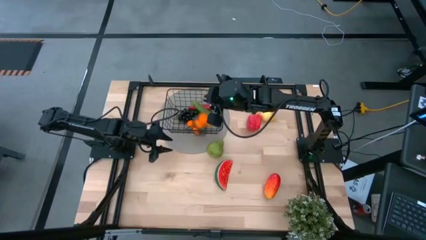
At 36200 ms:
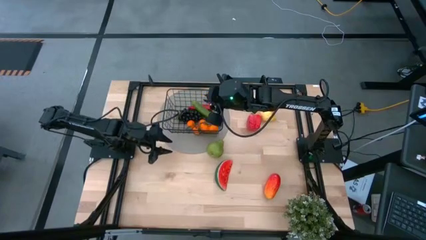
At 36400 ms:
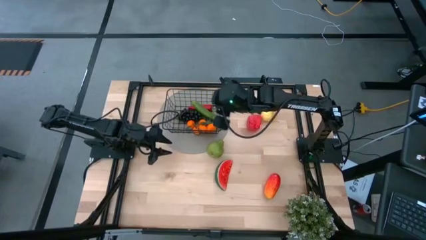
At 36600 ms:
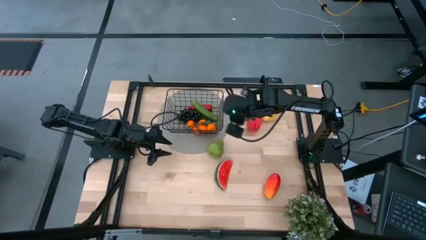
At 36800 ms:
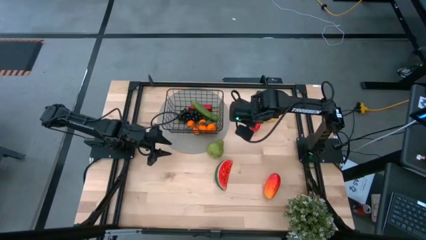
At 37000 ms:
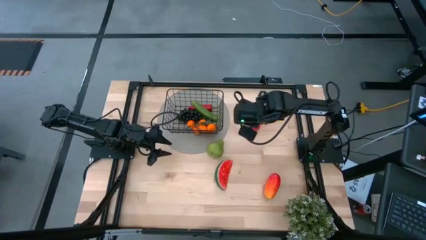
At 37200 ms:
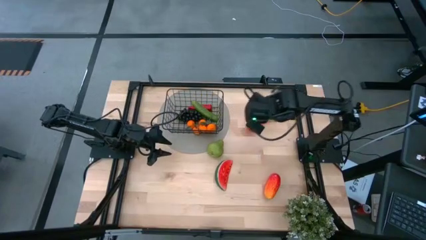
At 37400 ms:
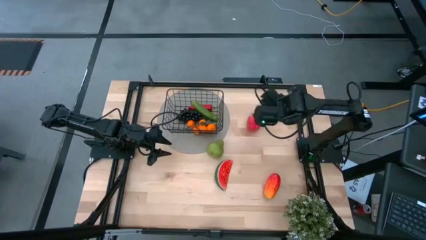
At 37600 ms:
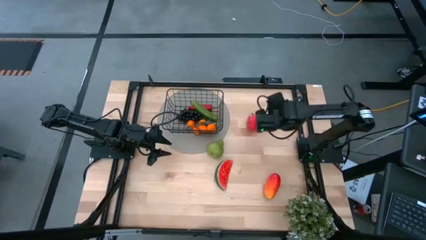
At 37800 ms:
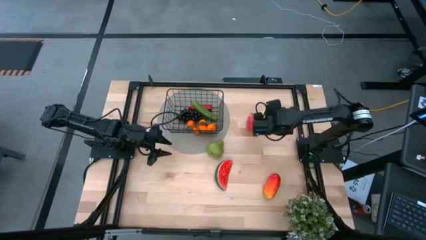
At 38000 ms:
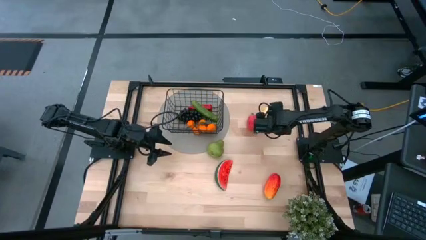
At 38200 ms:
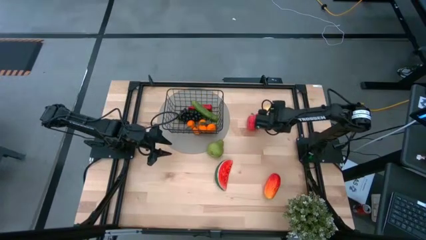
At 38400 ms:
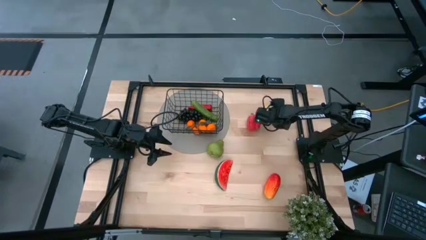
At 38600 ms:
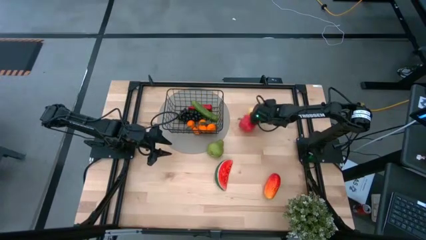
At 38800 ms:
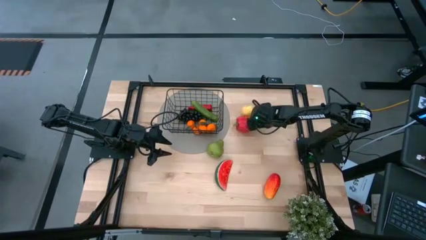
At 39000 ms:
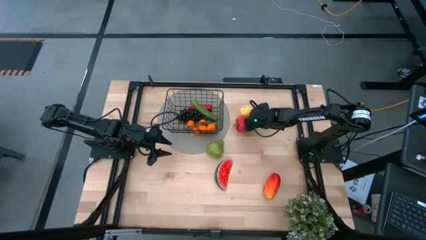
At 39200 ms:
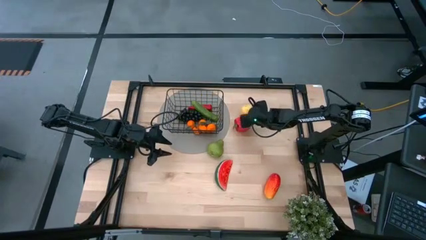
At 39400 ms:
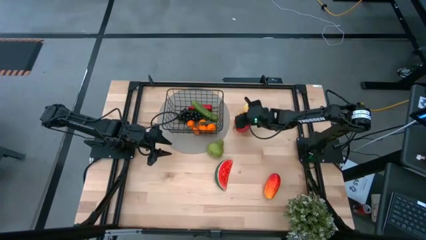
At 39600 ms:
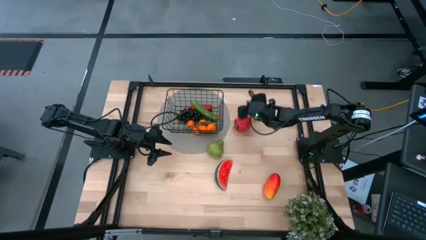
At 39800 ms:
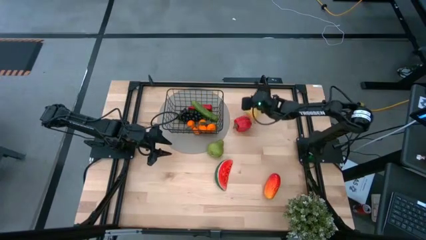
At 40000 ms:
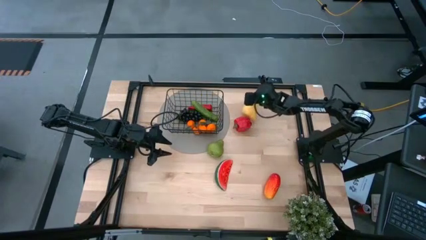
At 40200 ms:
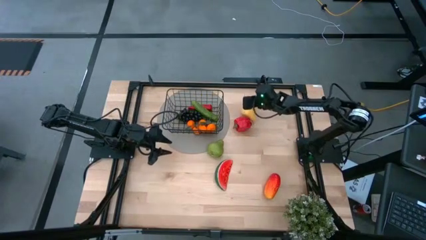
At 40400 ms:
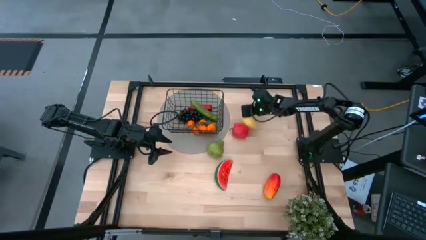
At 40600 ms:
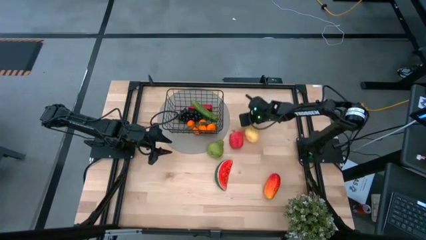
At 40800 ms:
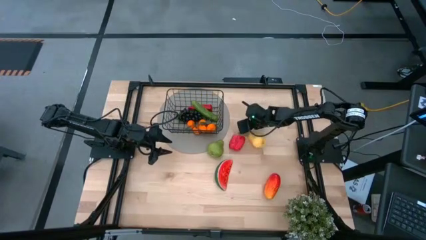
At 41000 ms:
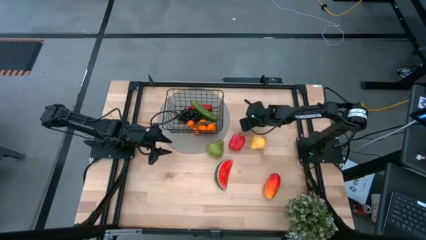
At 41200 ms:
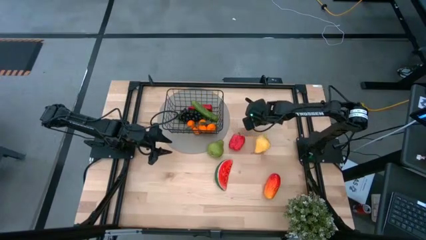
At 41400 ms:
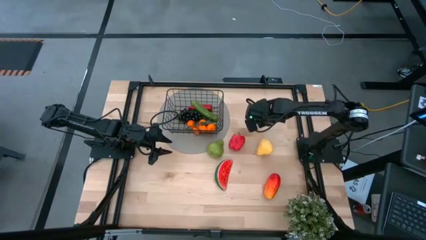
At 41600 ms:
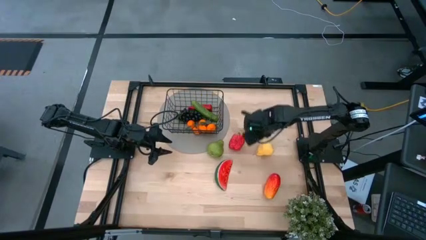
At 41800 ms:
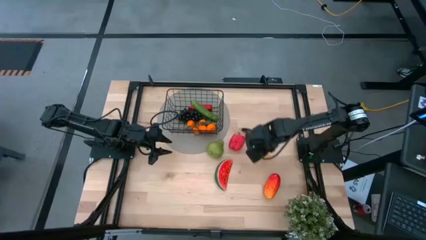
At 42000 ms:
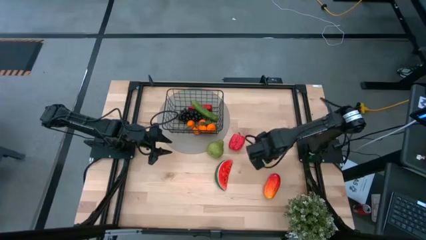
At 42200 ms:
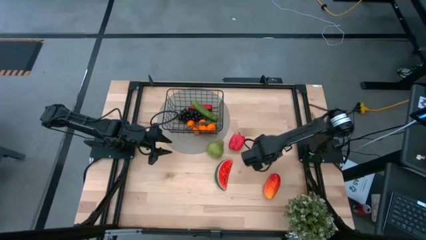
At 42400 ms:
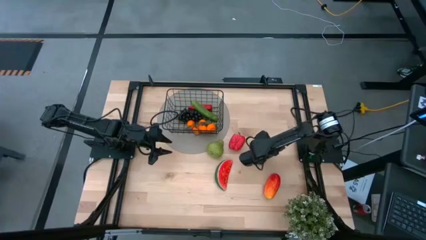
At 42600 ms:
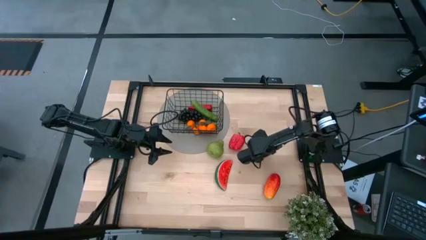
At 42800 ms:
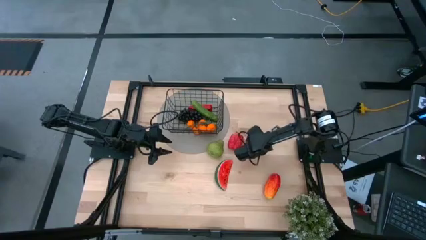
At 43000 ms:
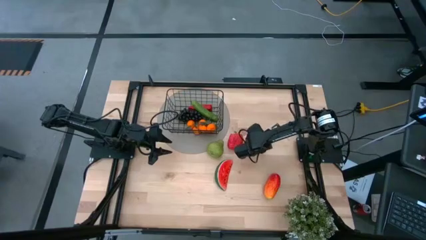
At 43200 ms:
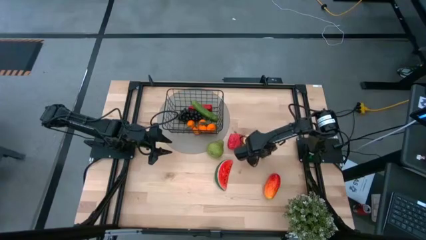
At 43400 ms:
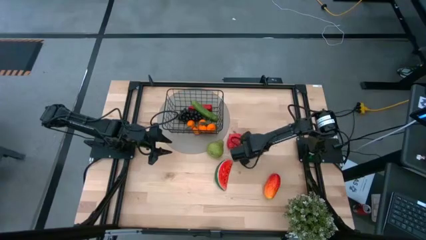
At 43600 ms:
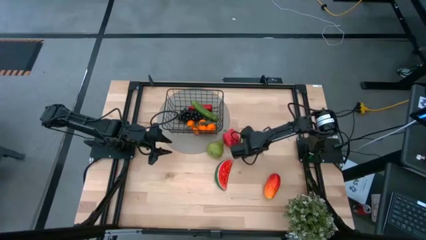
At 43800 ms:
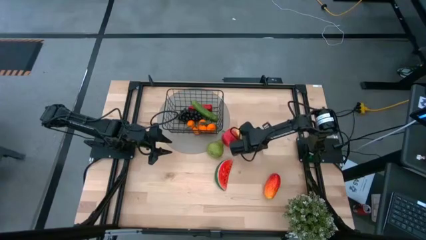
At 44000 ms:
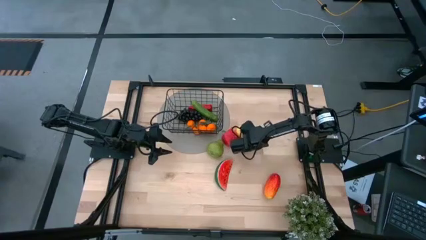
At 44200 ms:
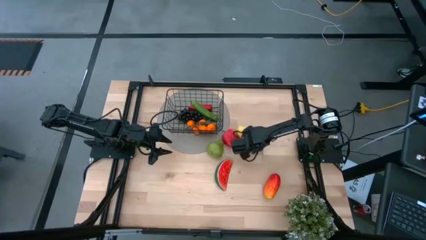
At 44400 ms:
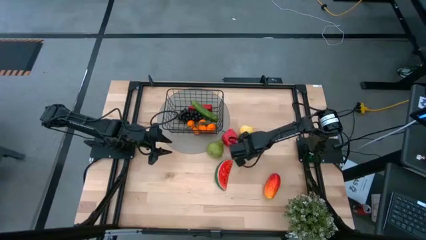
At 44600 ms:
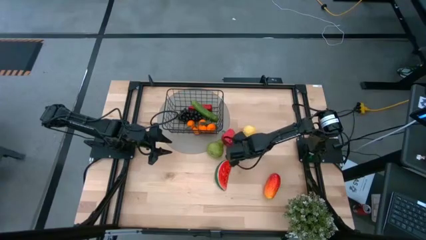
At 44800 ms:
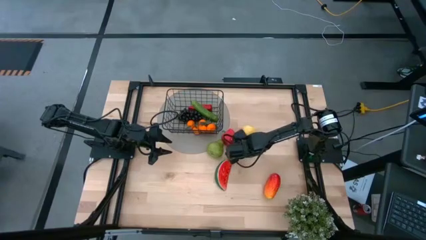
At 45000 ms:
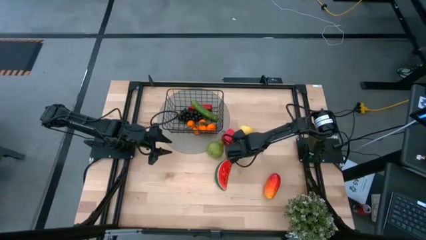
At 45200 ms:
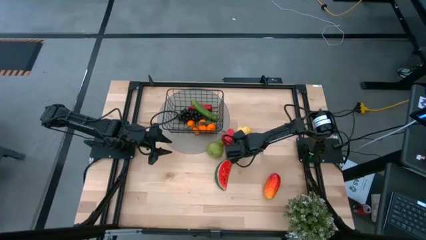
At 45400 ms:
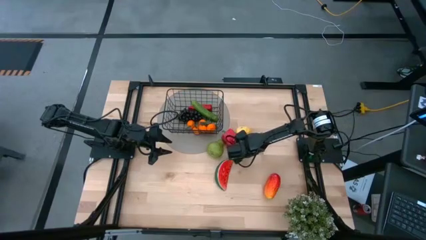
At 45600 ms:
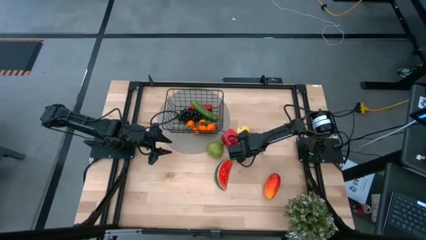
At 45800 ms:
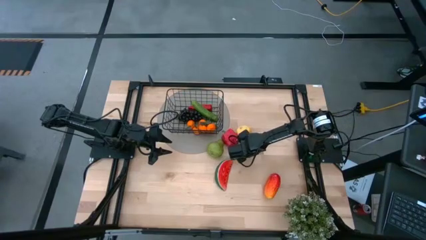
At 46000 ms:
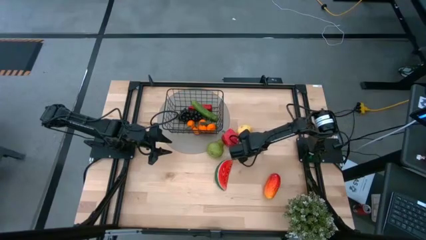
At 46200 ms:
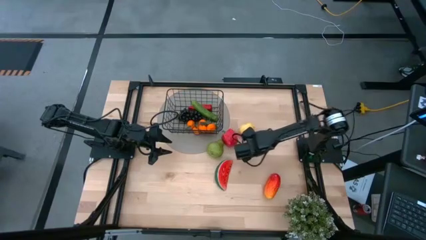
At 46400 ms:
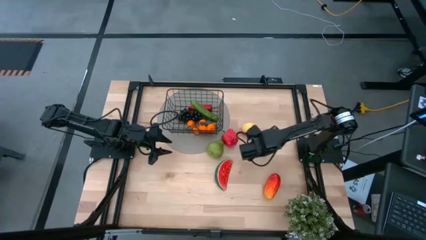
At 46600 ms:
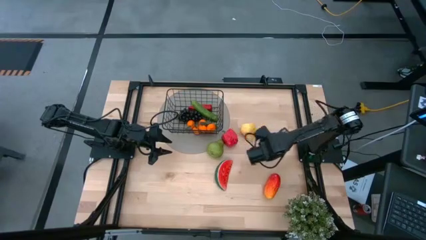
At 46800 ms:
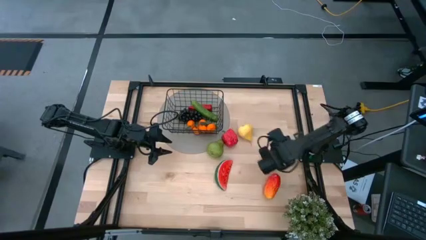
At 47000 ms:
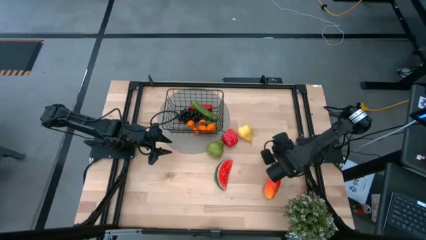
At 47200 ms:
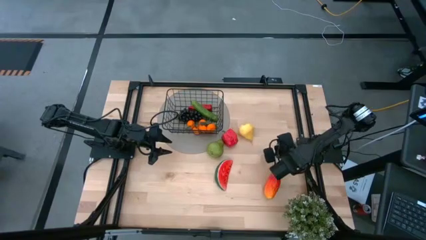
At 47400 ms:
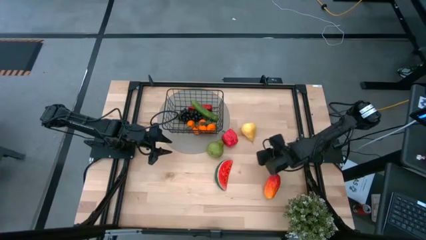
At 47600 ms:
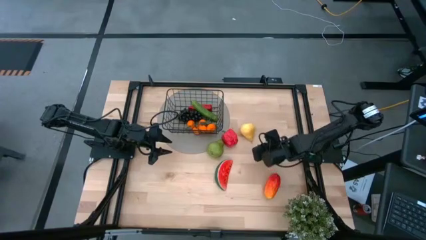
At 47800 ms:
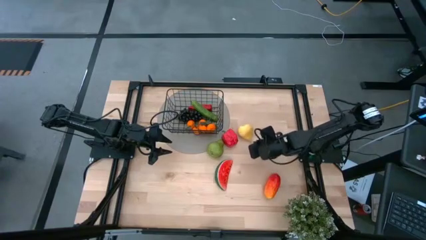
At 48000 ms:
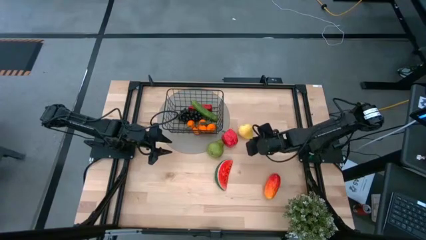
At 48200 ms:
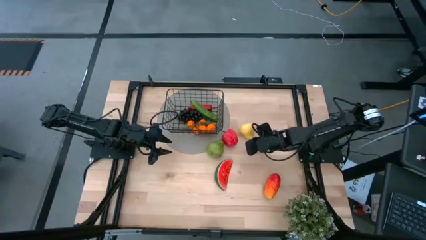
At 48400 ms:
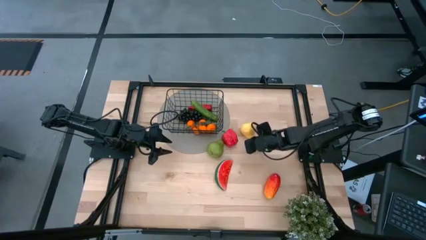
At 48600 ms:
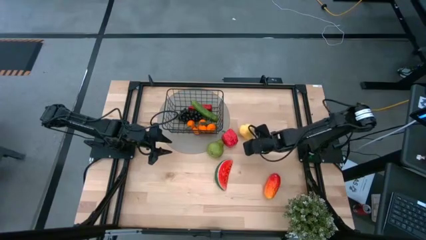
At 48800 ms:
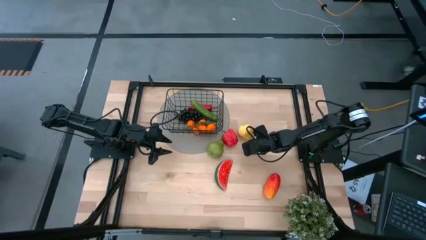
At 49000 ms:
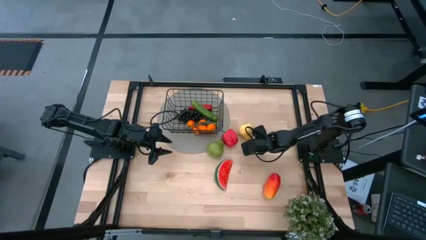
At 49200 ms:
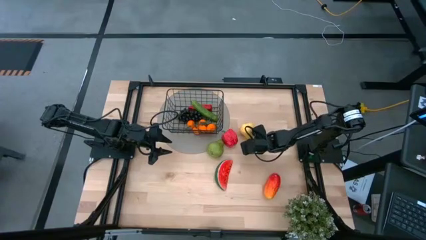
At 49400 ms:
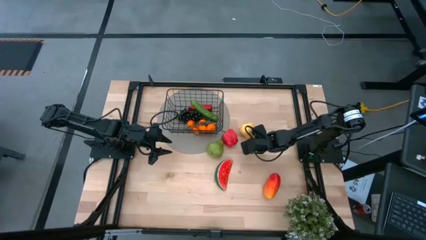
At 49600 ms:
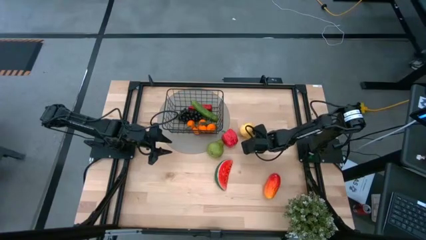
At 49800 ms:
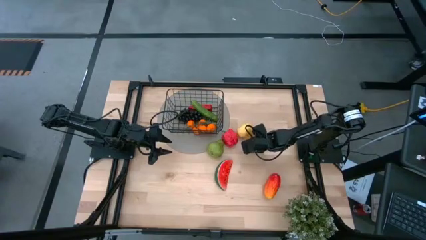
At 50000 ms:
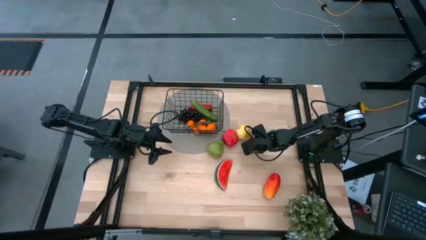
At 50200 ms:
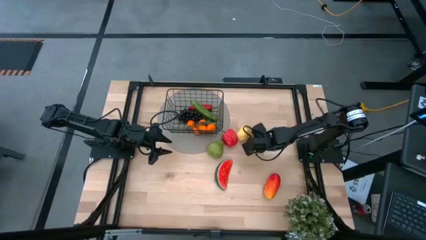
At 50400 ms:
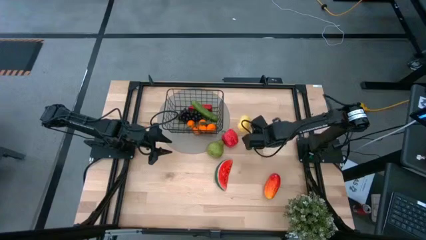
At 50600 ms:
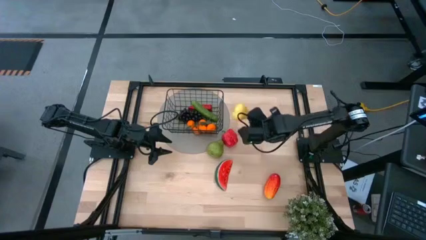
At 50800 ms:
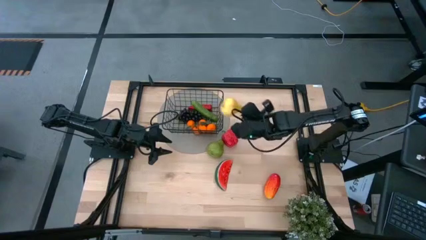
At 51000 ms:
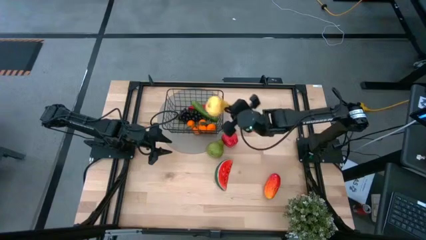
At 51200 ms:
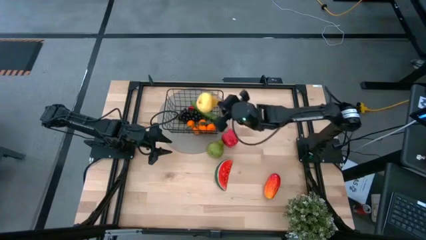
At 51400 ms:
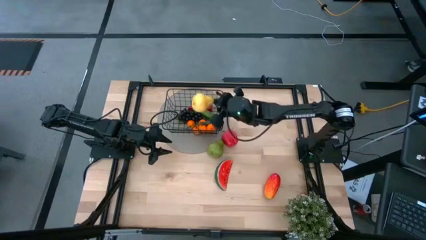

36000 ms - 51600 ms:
Task: Build produce basket
Put the yellow pear into the wire basket

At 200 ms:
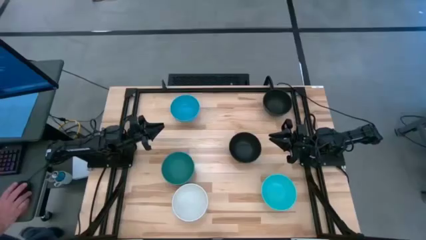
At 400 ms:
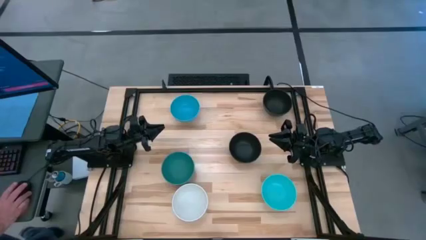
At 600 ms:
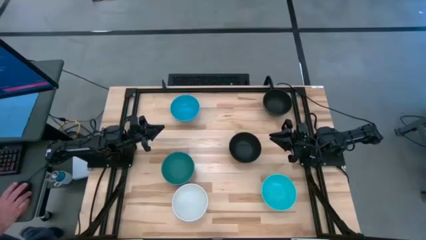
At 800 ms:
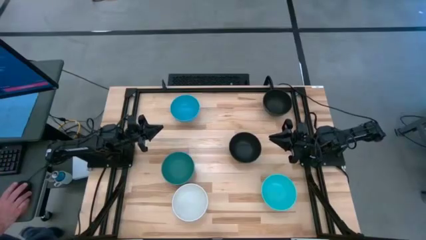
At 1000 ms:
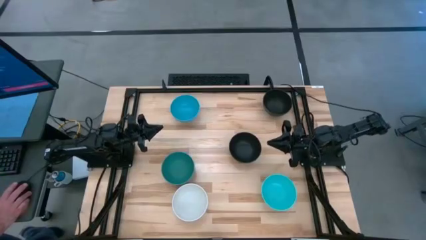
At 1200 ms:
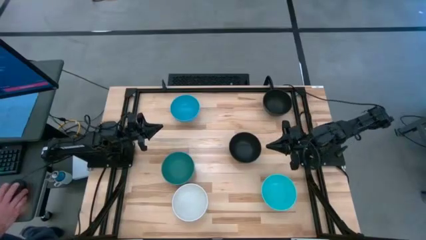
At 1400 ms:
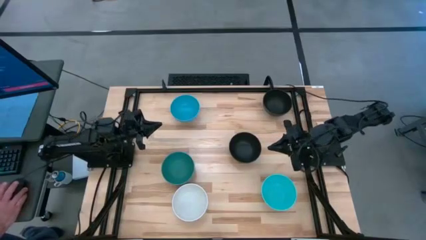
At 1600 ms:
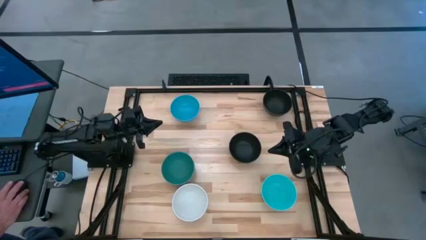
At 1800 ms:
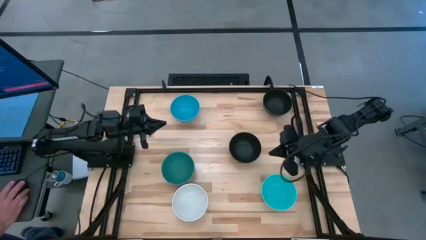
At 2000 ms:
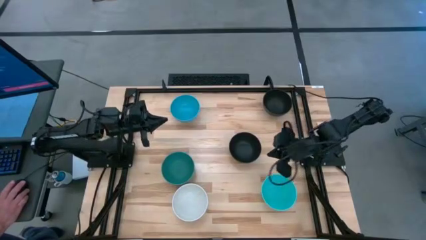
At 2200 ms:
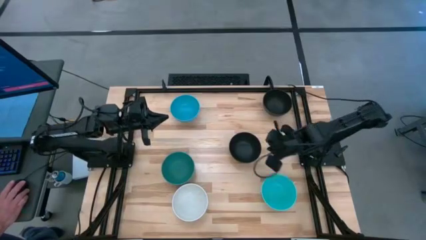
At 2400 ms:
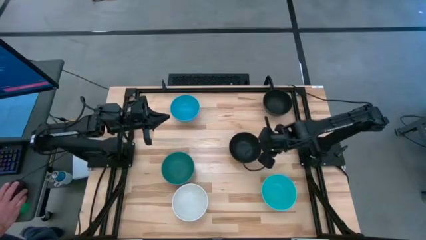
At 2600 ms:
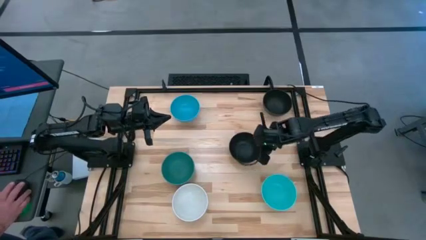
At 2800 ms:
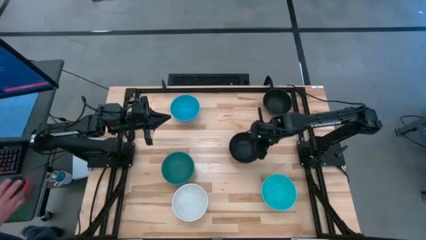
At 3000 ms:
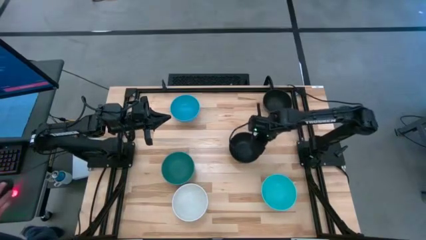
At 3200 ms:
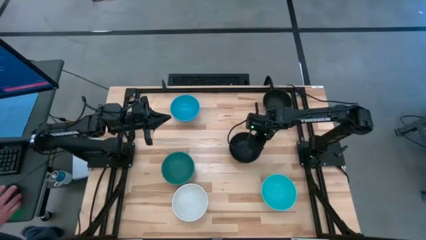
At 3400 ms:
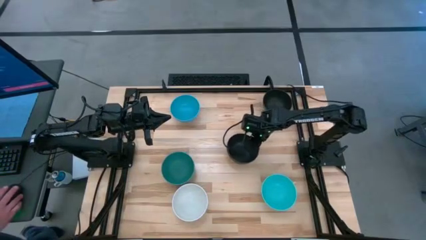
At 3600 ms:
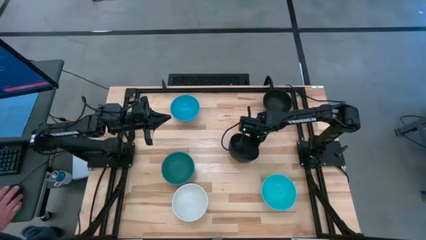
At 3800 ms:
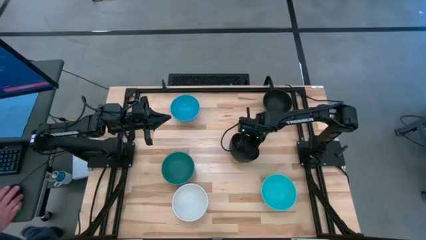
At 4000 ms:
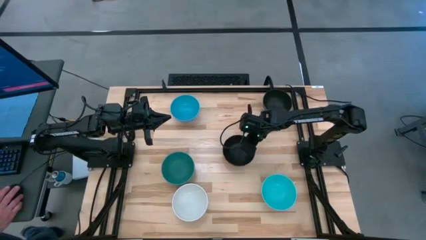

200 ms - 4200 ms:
Task: Nest bowls inside each other
Stack the black bowl on the green bowl
